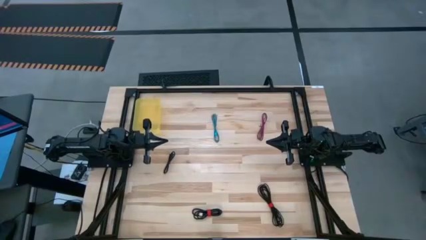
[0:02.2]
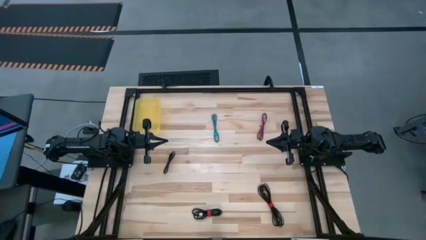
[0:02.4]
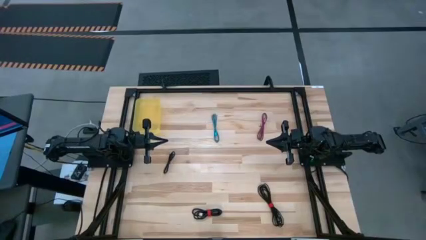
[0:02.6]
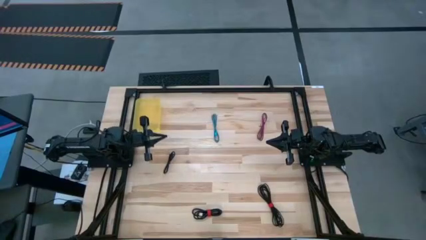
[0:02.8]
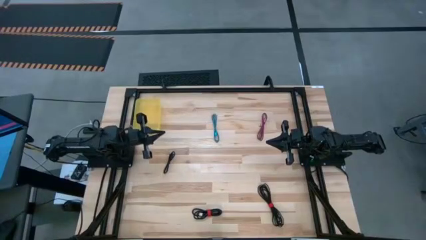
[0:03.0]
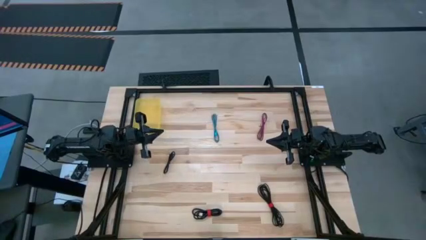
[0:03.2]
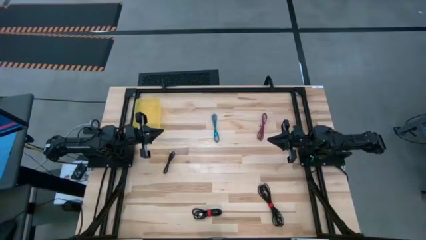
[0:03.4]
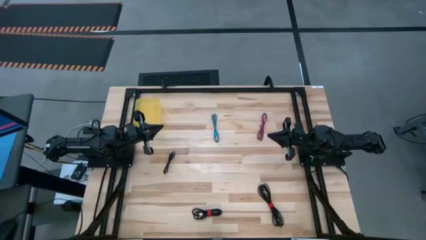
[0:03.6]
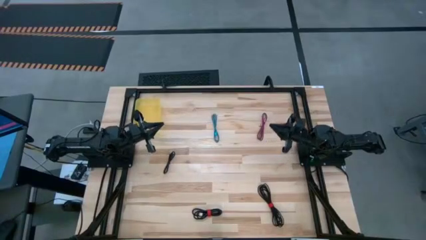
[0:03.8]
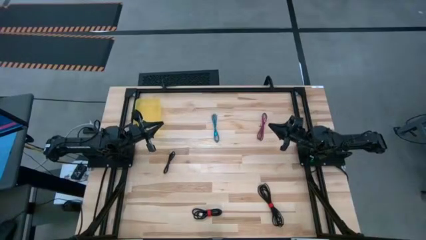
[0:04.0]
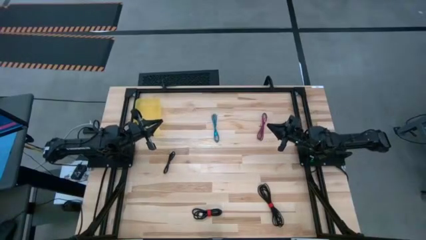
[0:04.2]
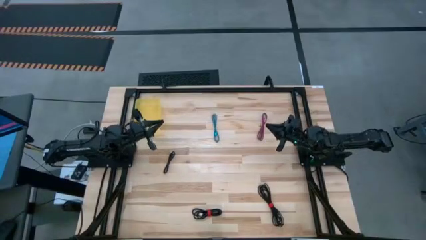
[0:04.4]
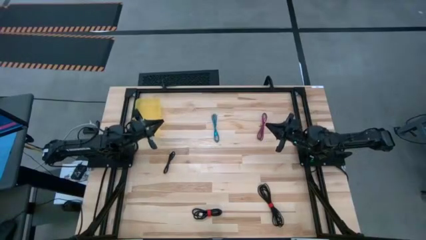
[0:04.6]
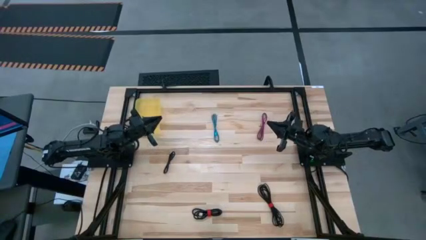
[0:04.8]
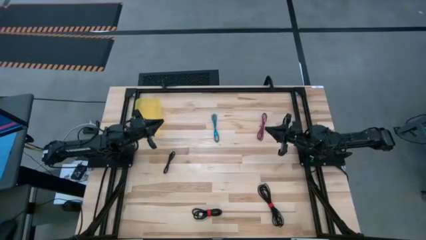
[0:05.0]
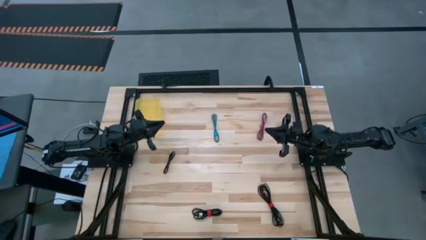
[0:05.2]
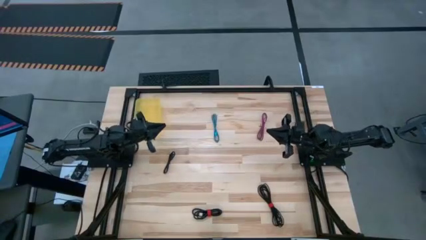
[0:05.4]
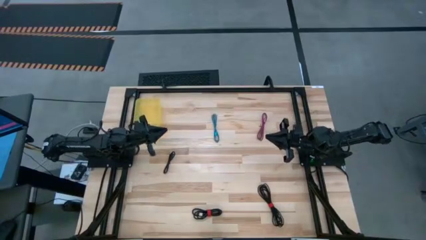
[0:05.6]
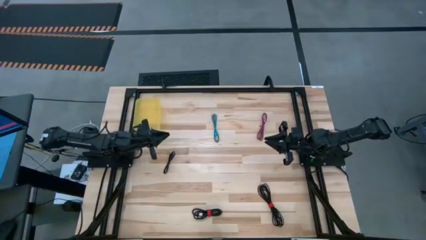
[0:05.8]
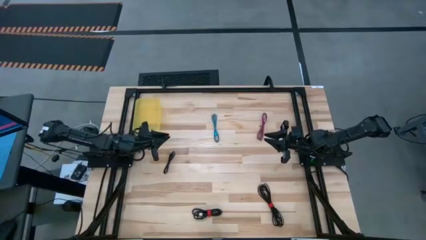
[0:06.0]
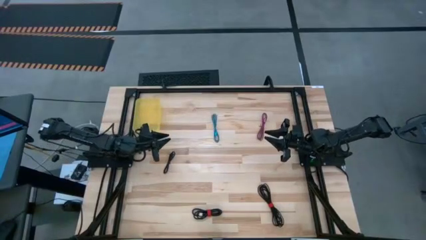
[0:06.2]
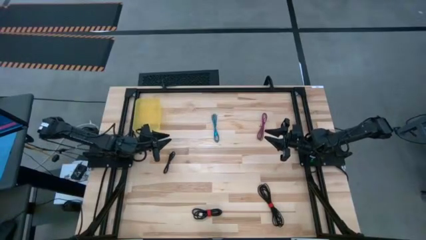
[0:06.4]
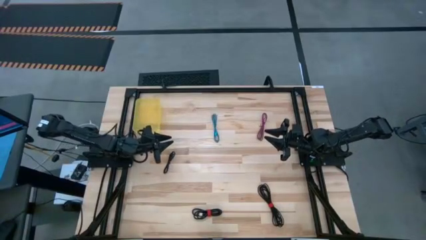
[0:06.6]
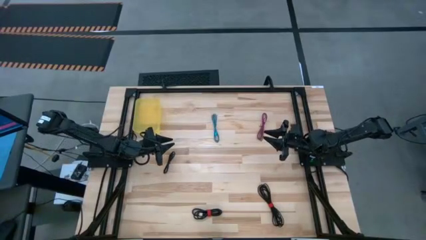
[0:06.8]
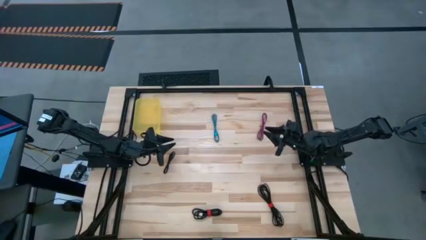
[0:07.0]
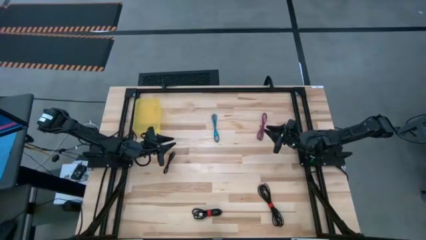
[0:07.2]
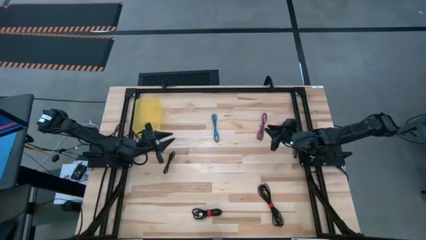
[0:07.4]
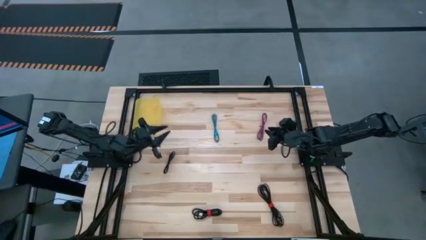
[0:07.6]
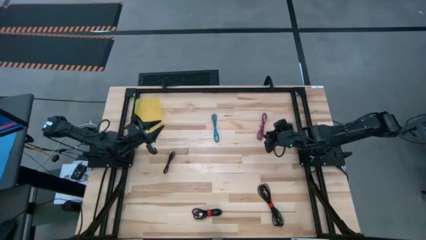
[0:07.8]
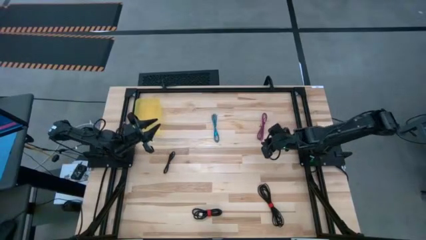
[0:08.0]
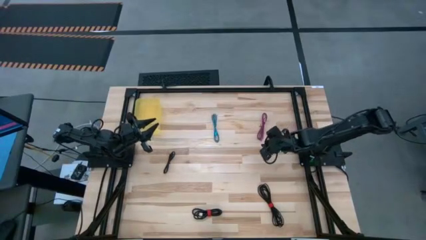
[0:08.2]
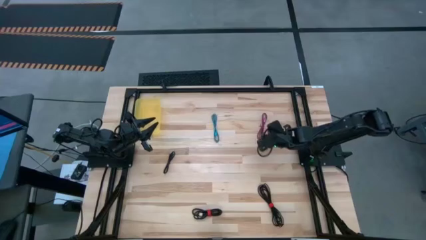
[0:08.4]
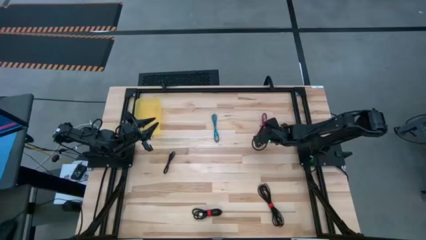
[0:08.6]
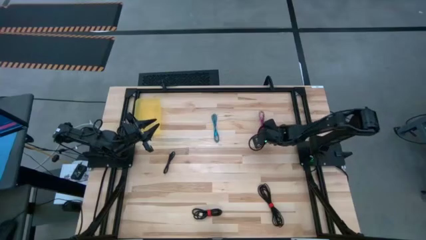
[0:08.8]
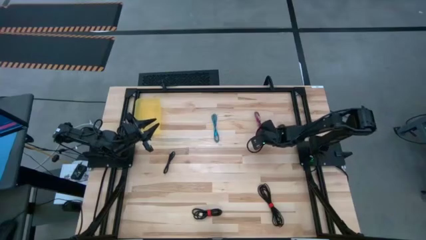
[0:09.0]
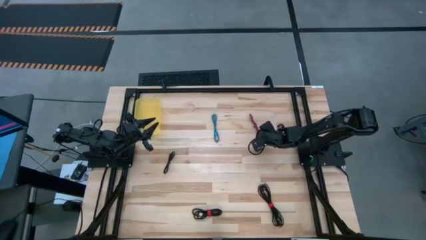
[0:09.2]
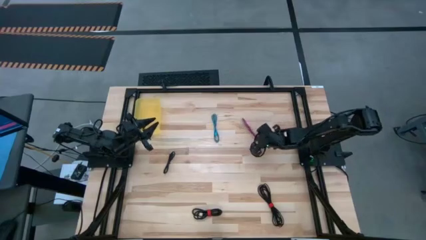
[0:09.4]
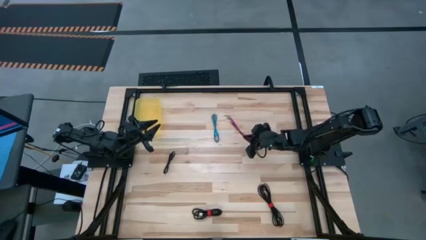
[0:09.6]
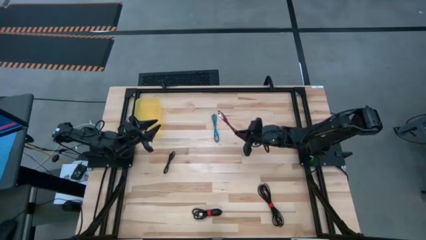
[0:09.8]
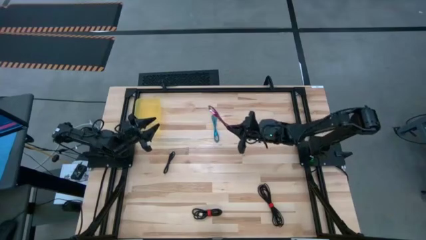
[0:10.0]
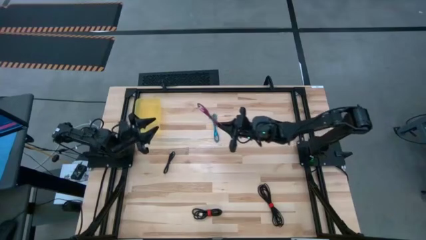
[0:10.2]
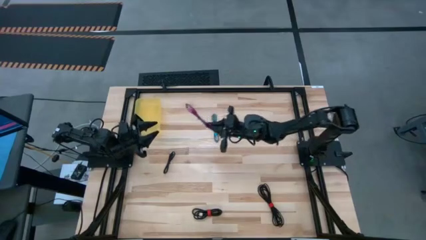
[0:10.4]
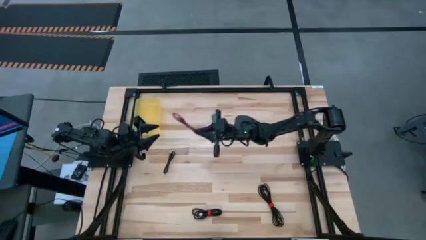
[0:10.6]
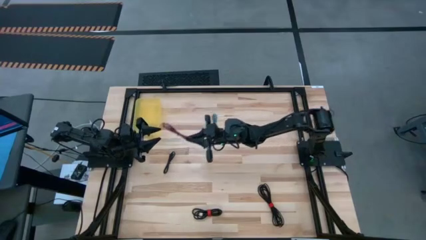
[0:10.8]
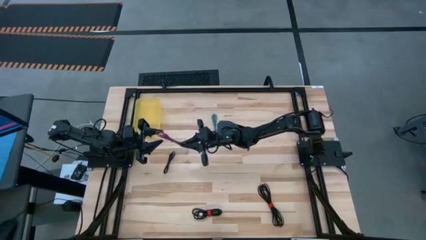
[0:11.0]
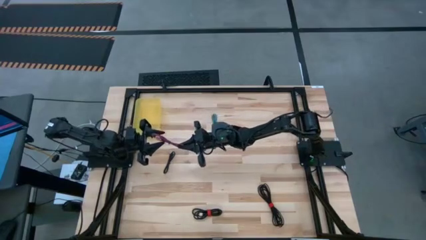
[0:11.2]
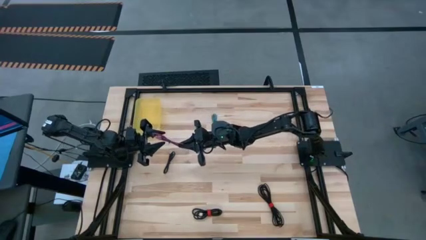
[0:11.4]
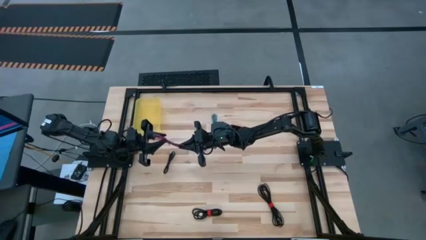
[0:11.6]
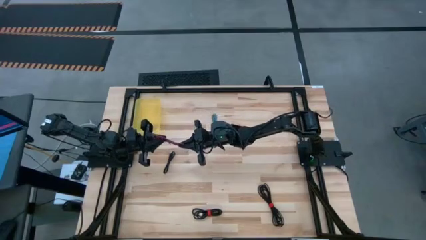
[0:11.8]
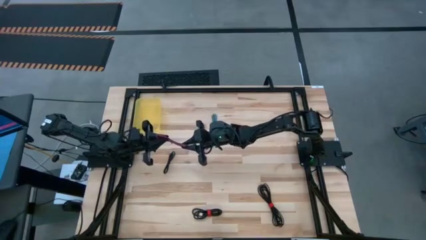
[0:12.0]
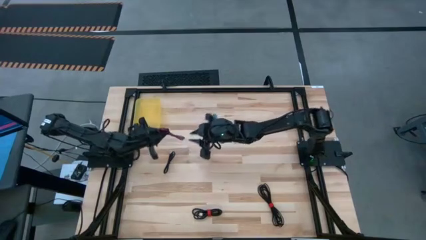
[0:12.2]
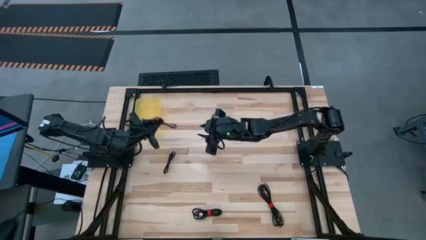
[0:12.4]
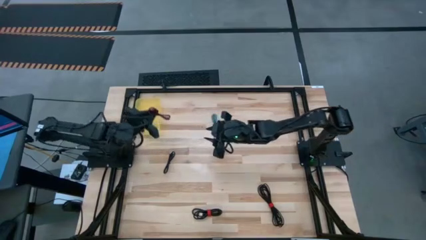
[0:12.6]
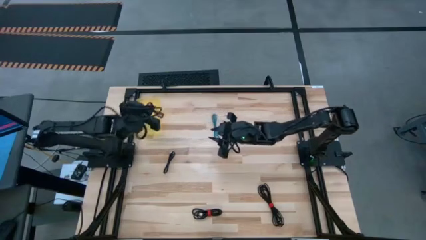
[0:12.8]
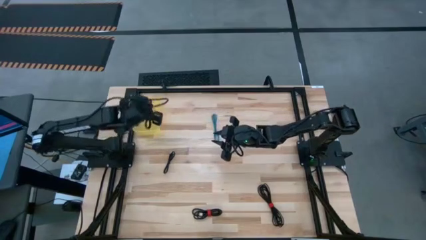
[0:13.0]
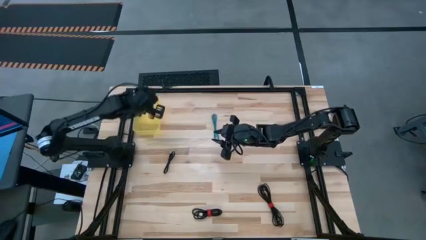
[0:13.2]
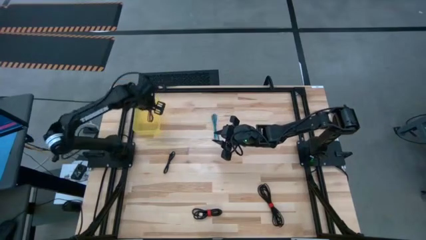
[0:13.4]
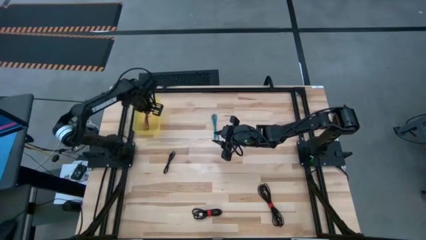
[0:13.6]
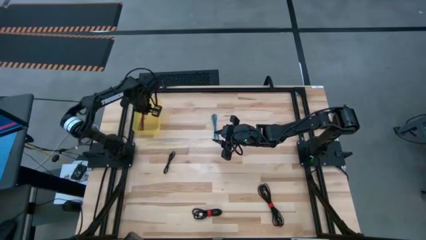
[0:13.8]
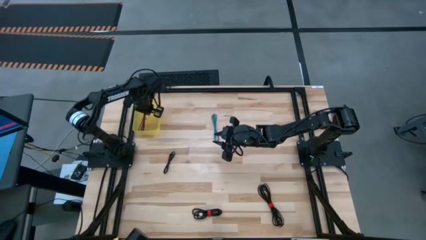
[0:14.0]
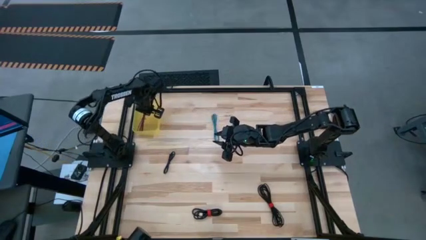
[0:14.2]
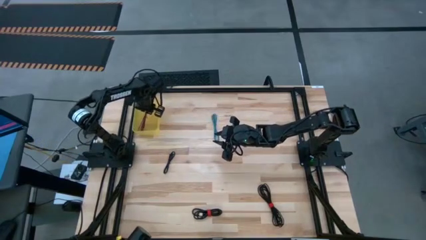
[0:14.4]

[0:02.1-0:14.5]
Task: Pick and place USB-C Cables
Put the pink USB cable into the yellow bin

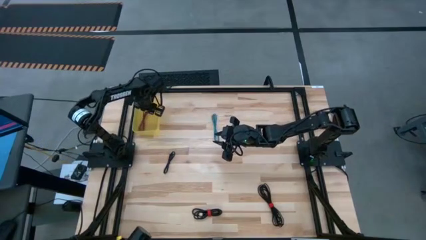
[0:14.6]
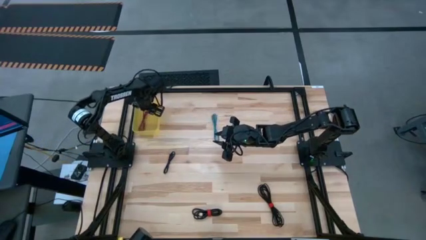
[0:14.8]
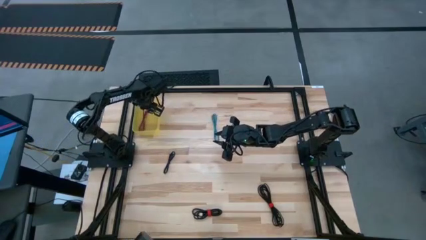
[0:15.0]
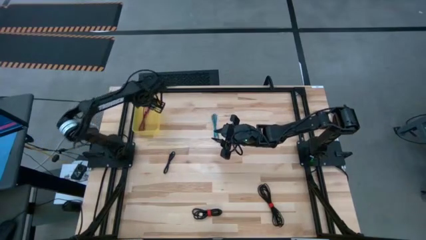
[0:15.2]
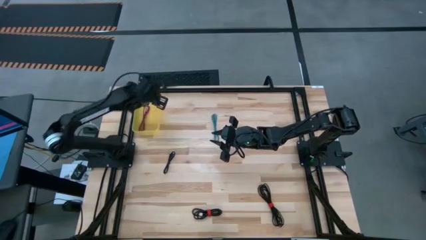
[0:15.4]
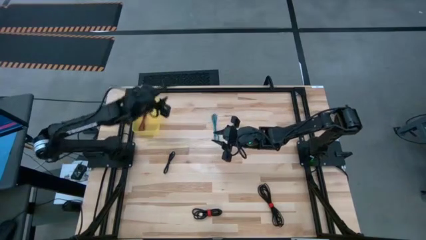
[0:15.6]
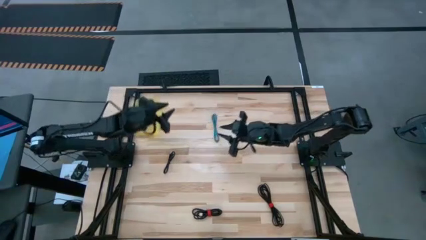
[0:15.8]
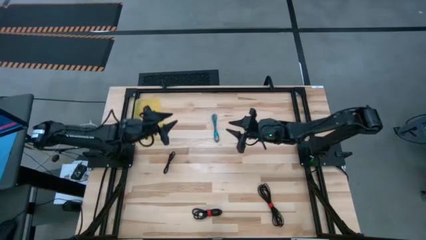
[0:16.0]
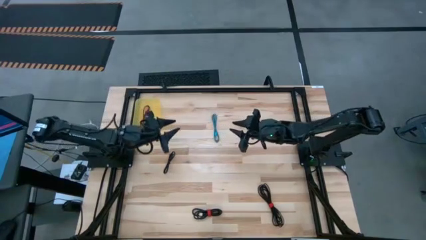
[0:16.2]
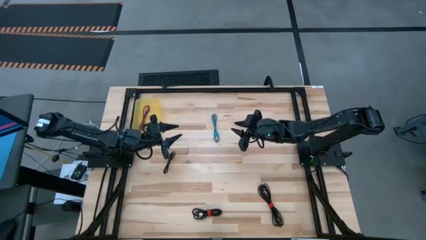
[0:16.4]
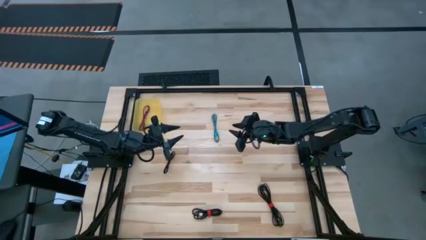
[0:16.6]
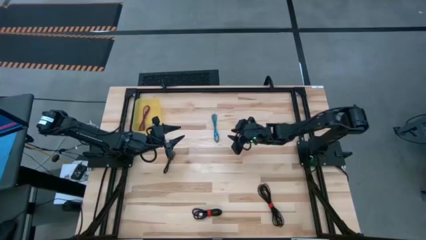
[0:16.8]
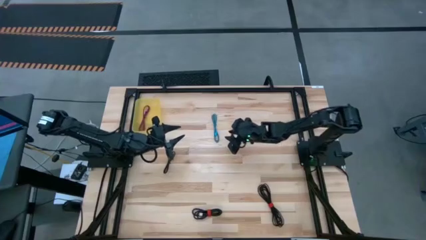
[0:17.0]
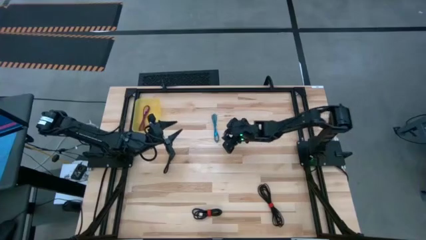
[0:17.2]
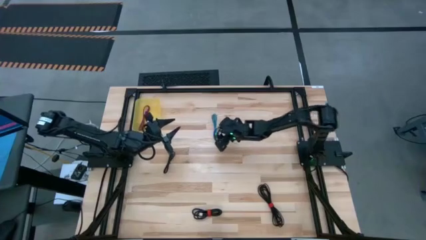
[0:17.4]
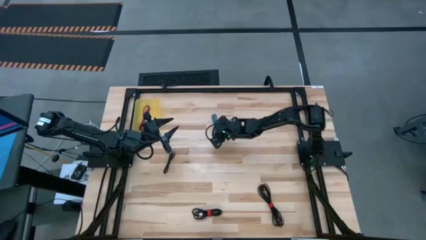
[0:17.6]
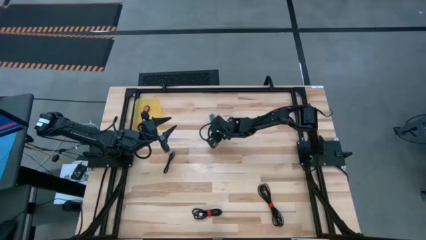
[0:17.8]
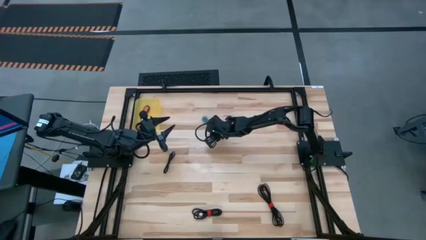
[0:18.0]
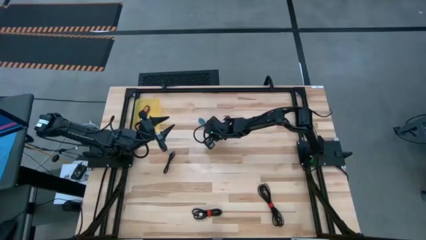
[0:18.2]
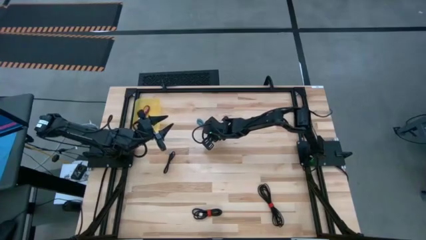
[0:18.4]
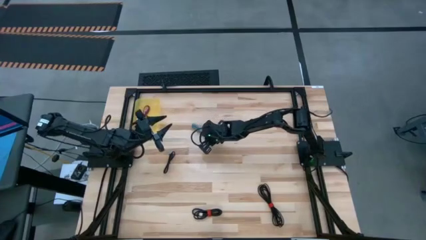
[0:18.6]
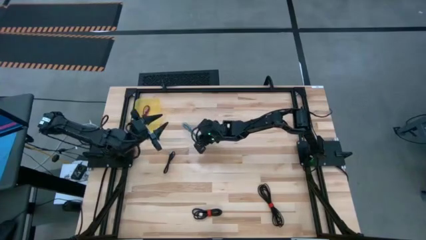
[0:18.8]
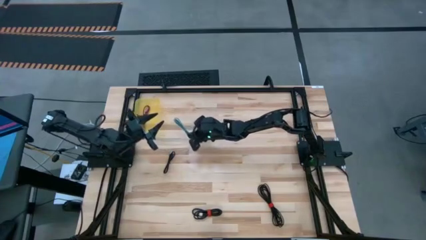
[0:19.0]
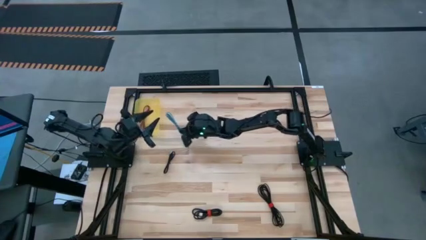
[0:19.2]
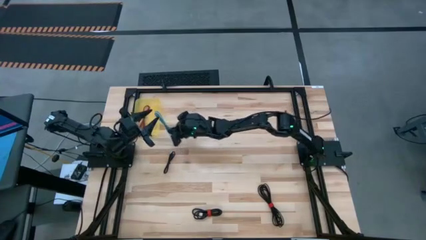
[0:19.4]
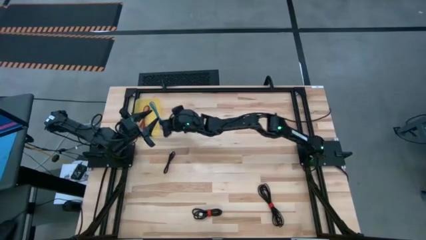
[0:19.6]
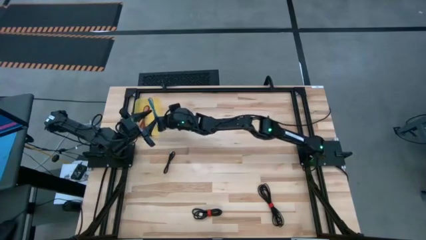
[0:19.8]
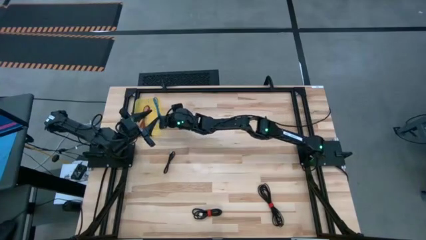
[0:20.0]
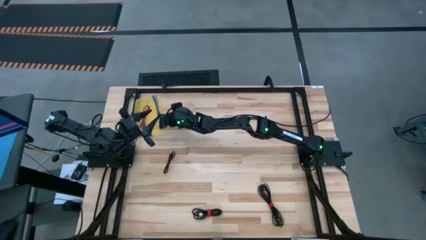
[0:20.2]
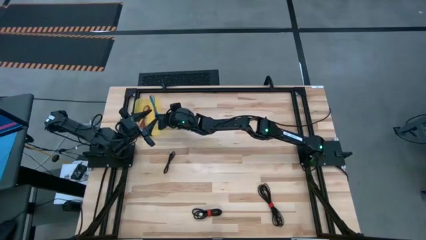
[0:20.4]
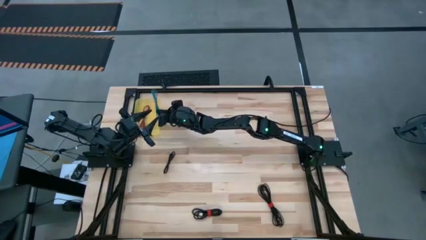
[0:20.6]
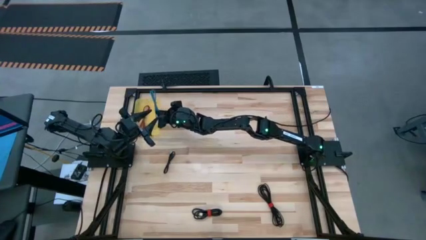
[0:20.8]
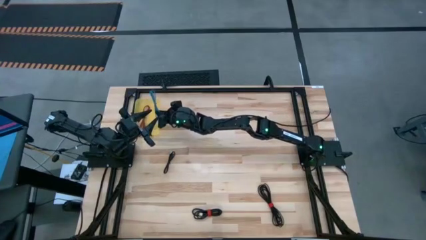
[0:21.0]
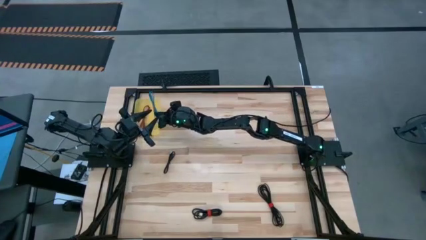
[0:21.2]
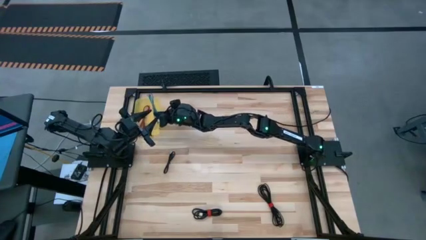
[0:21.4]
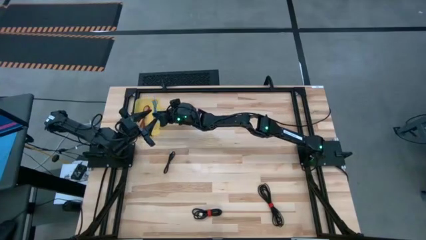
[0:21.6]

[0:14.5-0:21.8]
Put the blue USB cable into the yellow bin
